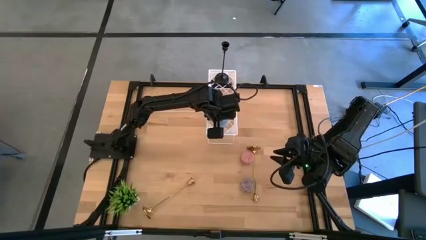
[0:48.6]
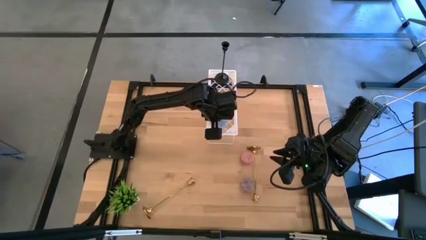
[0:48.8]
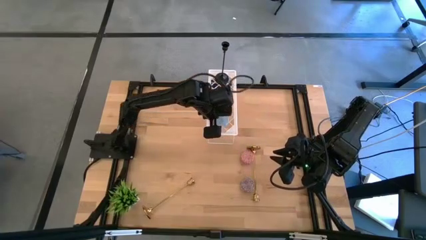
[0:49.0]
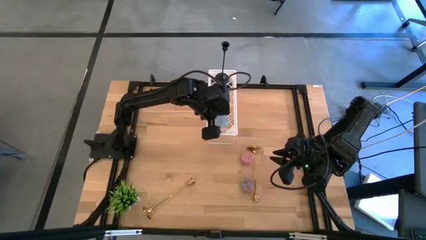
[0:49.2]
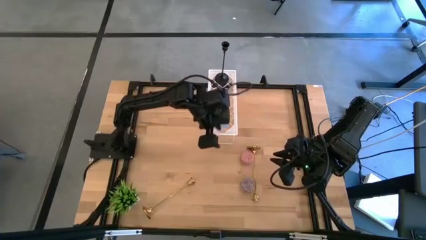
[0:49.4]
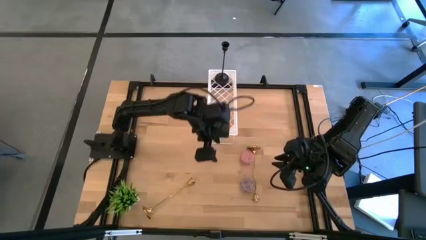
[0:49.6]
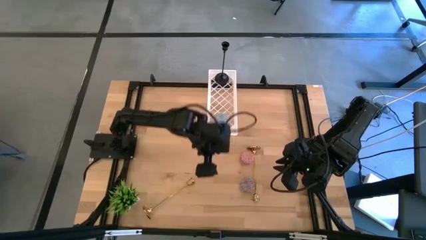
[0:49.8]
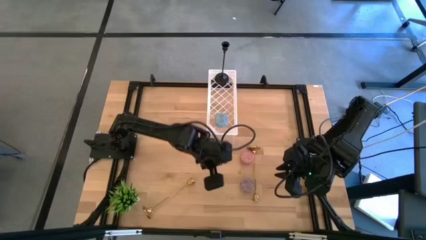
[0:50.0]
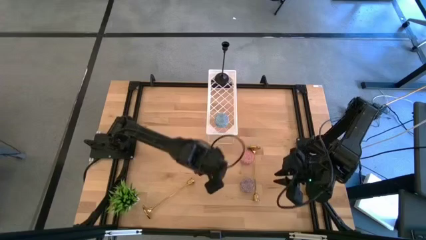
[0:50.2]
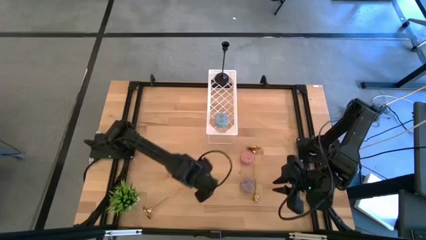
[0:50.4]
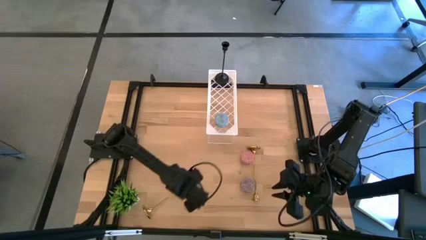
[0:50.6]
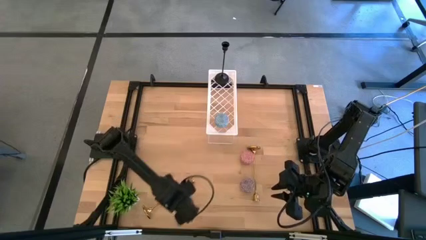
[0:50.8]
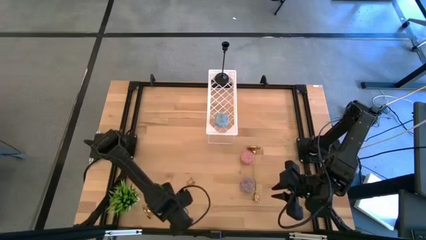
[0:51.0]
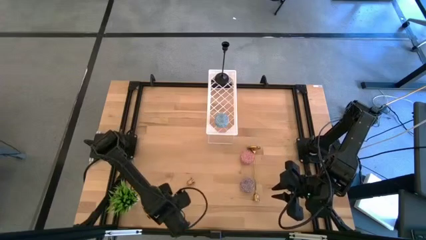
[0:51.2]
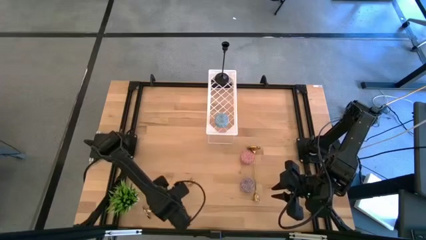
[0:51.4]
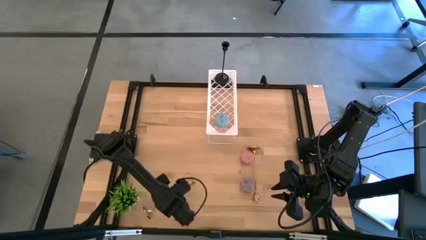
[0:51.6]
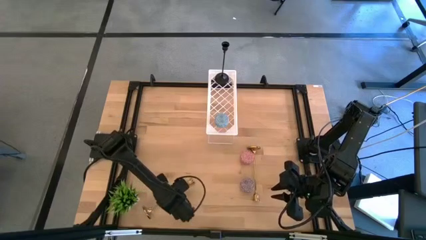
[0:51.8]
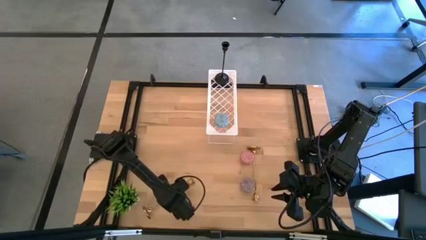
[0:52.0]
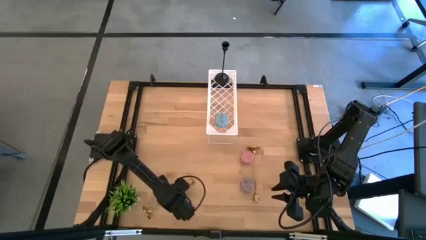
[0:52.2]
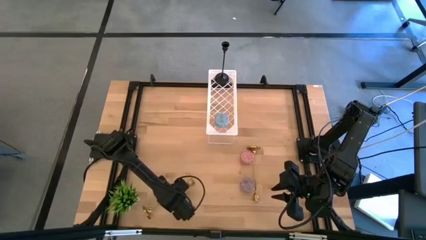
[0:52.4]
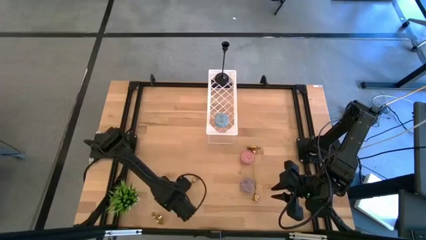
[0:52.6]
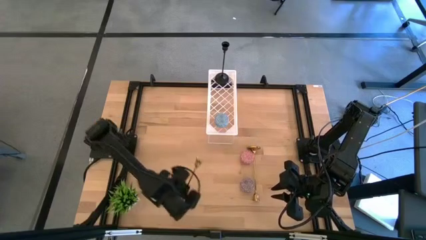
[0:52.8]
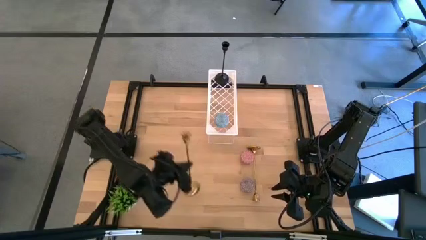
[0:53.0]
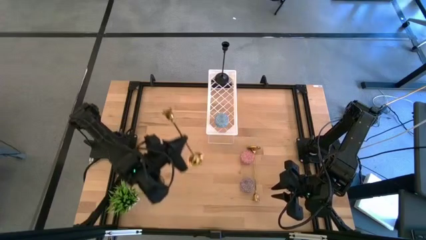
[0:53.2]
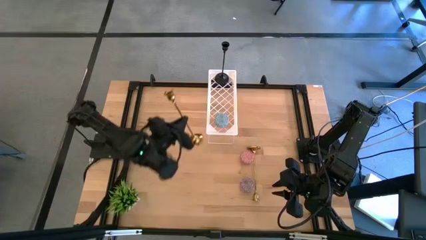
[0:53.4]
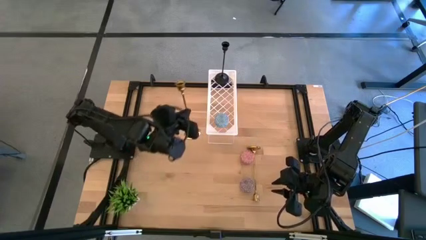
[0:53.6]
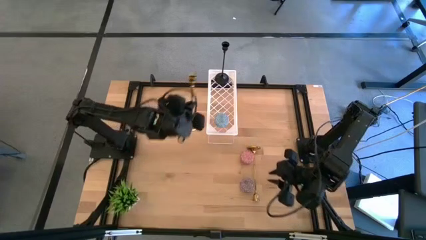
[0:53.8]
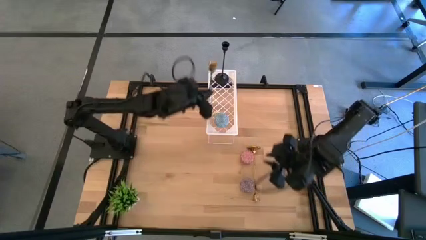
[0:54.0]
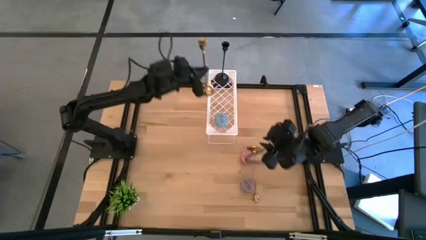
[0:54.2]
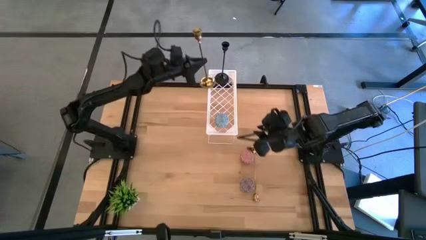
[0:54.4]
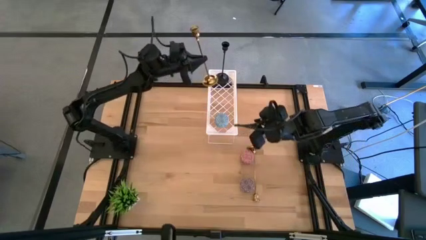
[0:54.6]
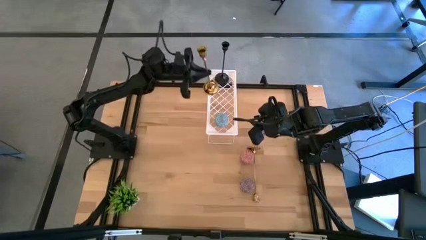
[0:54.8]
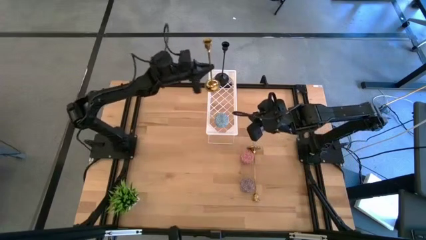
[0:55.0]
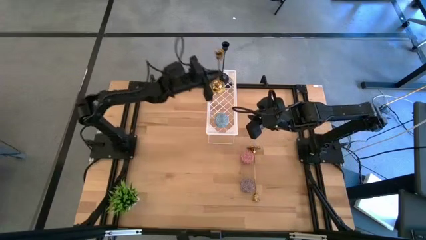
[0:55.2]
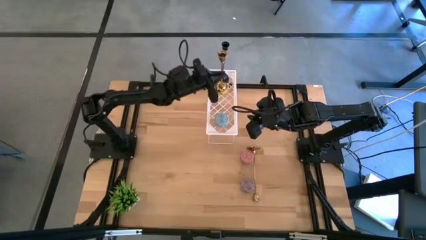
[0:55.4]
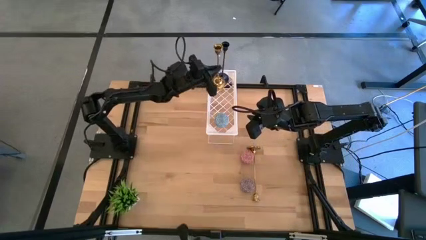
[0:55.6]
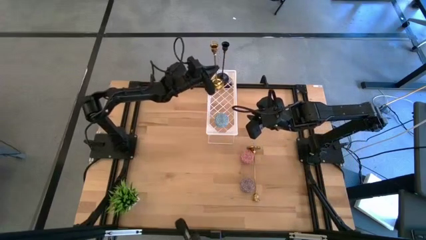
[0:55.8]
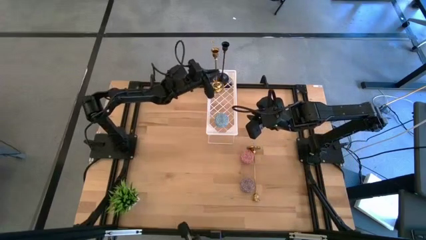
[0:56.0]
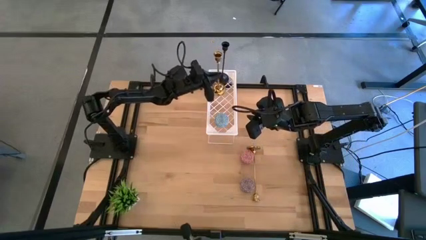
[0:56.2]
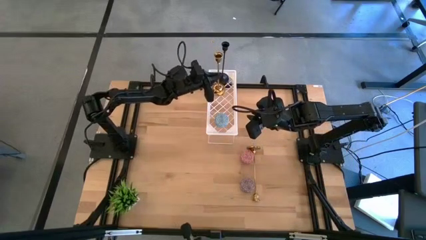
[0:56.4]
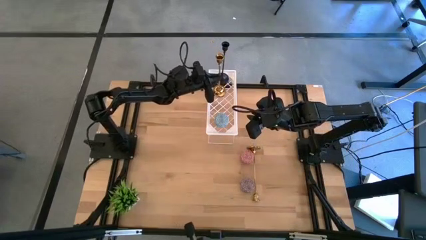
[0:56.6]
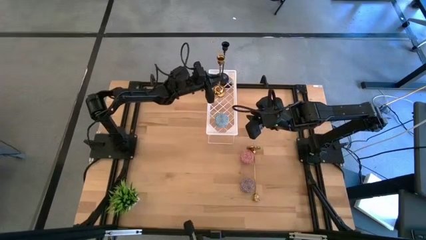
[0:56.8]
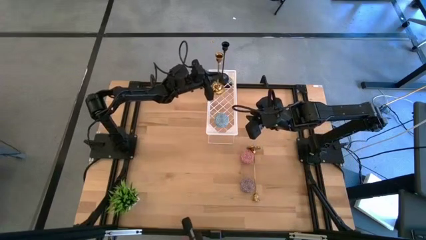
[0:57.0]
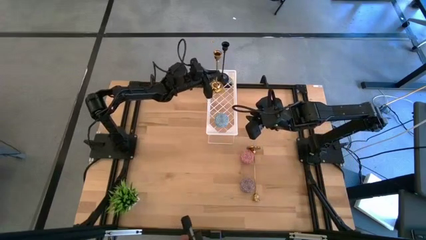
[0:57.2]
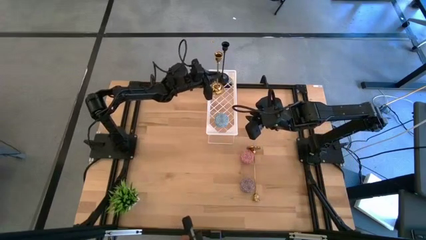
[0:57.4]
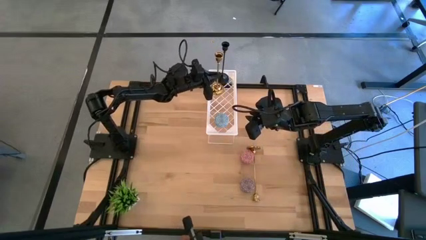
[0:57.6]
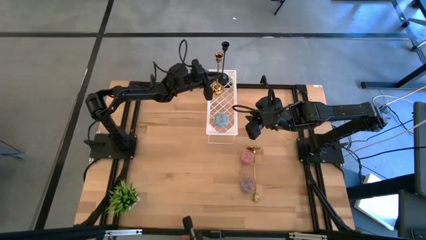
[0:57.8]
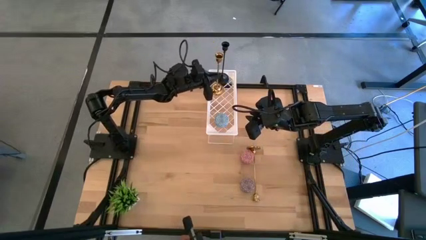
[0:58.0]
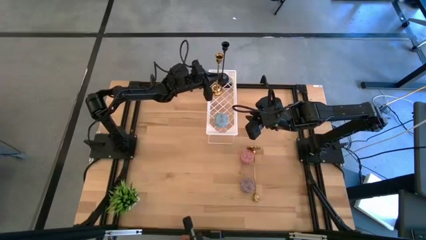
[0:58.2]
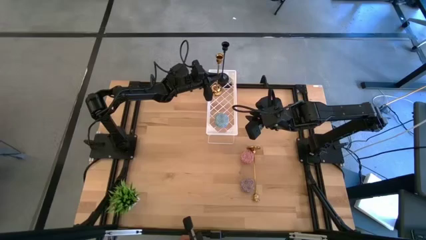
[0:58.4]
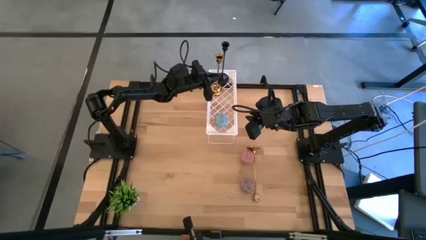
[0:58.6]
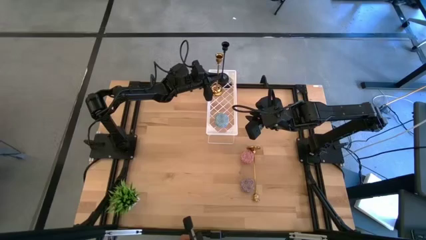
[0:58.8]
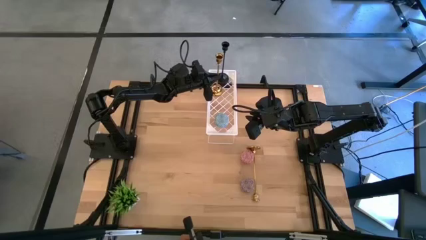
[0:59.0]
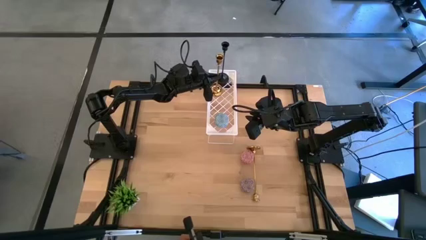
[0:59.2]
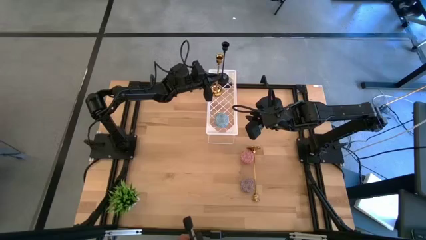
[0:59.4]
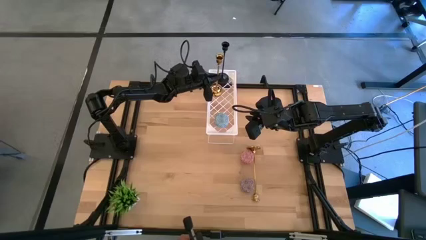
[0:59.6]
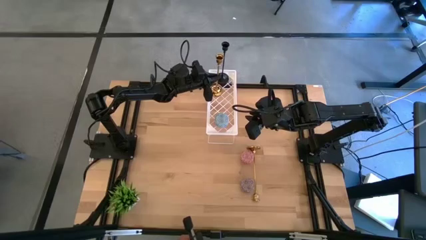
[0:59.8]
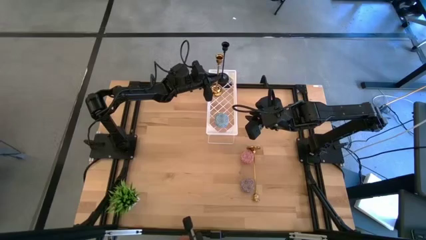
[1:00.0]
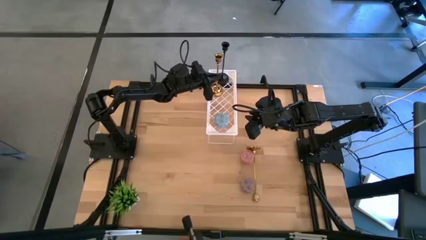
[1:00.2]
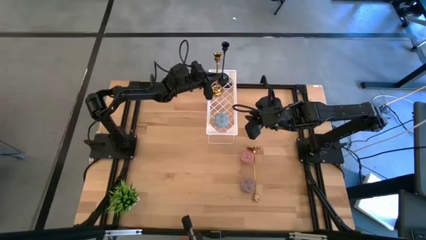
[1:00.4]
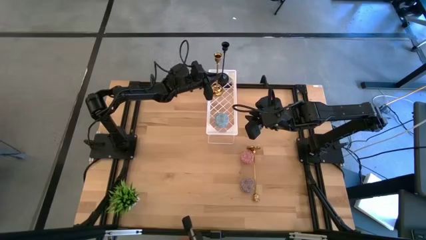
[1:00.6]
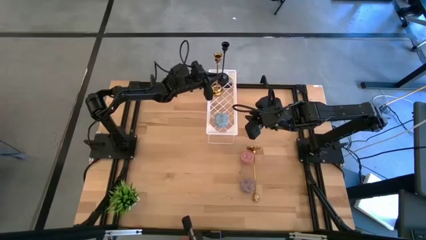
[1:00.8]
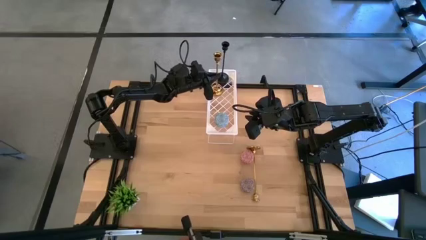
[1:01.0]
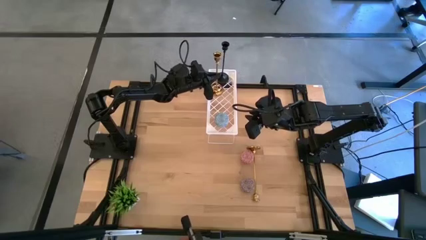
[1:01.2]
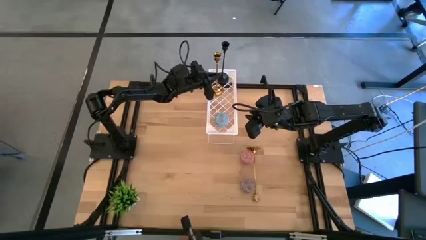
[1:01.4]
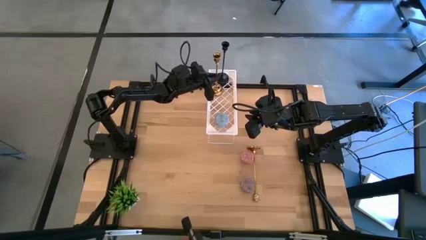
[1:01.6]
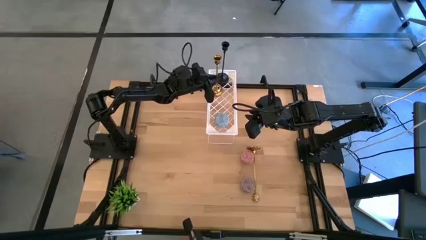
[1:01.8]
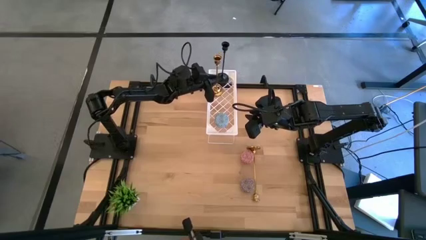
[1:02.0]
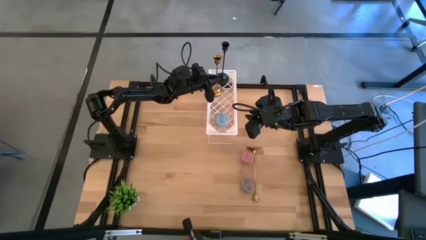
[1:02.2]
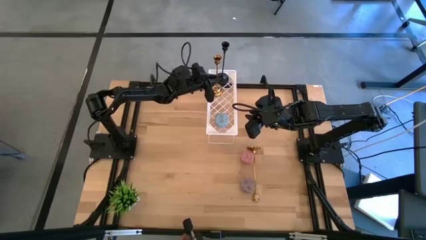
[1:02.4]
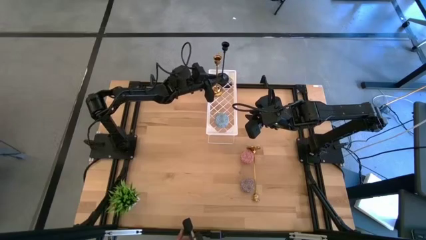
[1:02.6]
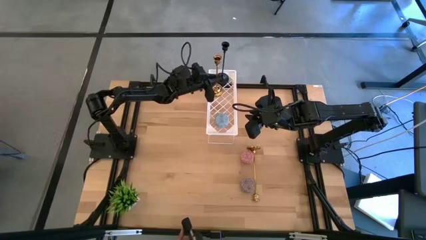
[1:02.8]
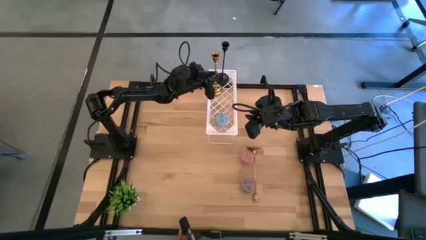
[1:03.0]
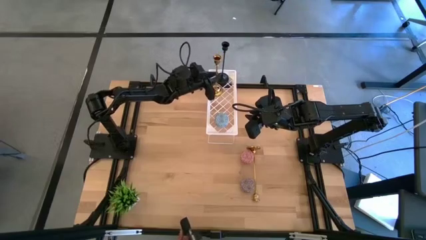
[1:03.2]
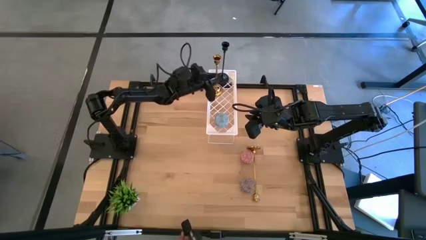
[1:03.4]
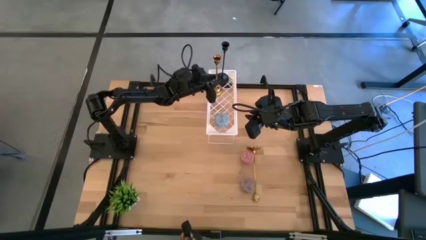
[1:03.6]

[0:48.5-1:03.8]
Task: Pick & Place candle stick holders
Put the left gold candle holder on the shelf
